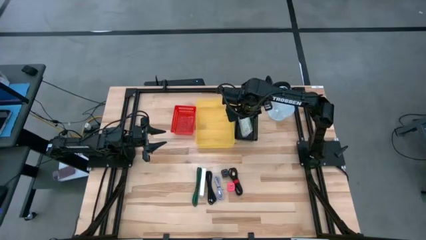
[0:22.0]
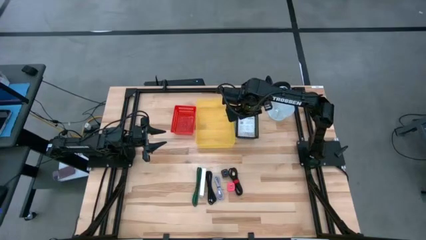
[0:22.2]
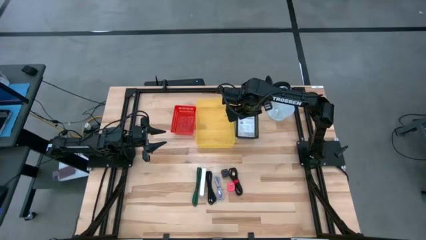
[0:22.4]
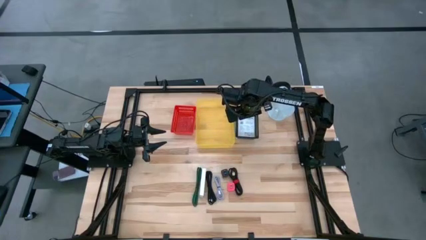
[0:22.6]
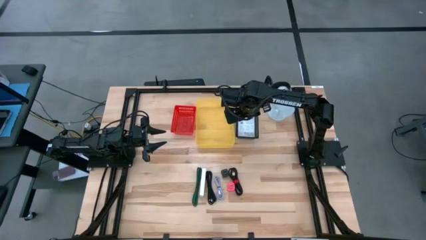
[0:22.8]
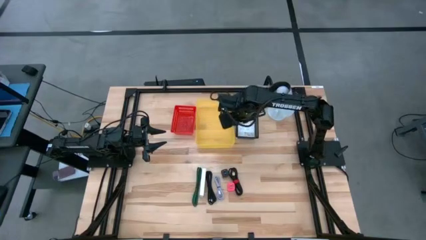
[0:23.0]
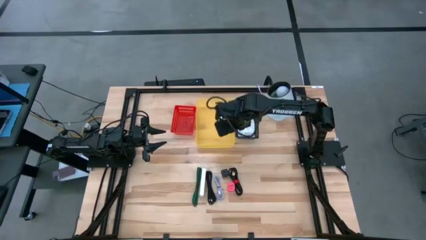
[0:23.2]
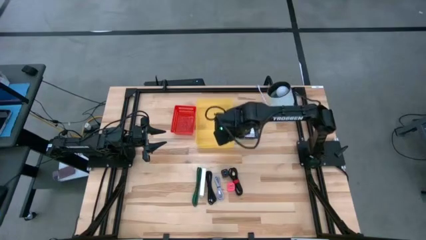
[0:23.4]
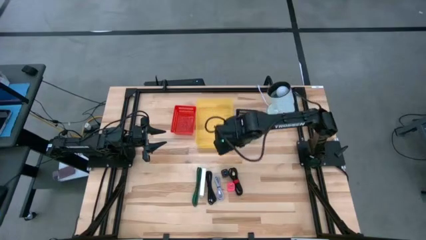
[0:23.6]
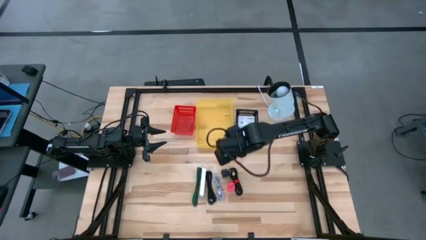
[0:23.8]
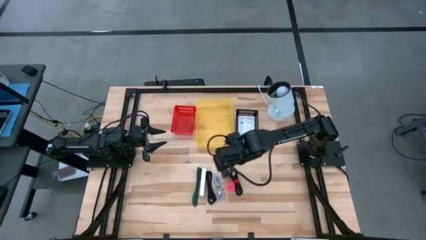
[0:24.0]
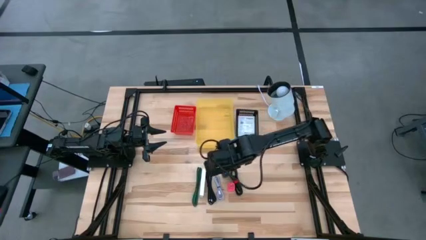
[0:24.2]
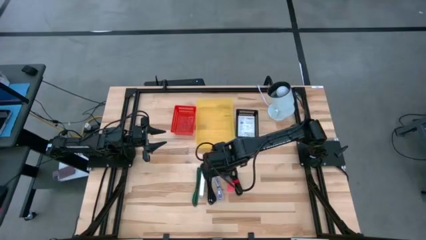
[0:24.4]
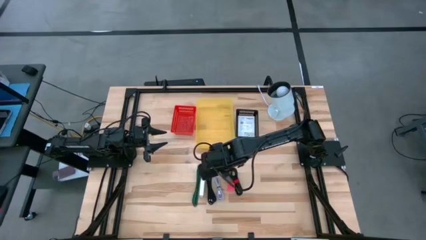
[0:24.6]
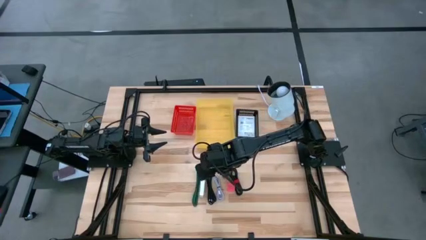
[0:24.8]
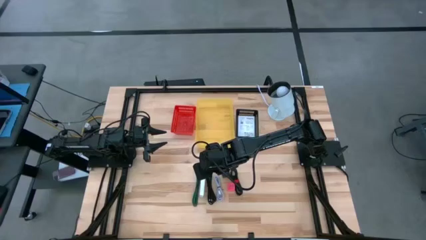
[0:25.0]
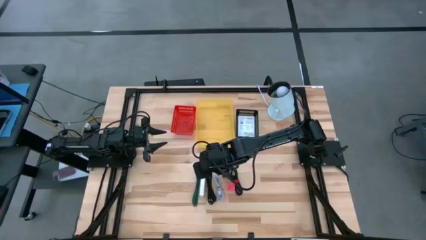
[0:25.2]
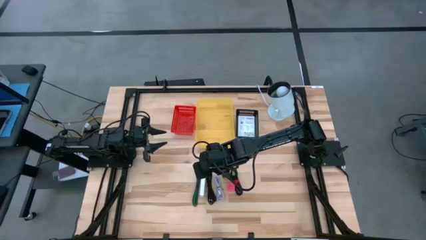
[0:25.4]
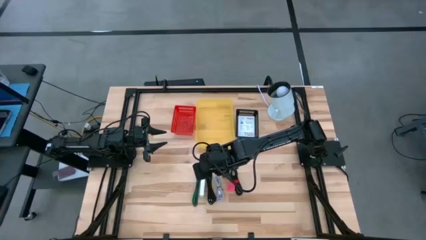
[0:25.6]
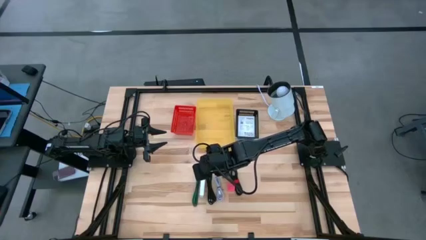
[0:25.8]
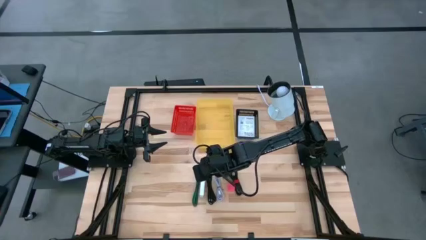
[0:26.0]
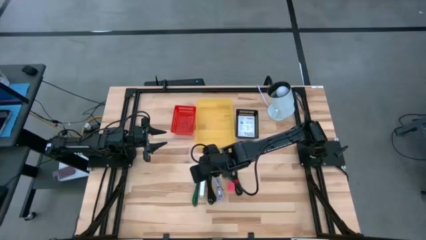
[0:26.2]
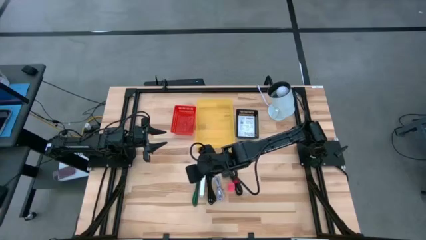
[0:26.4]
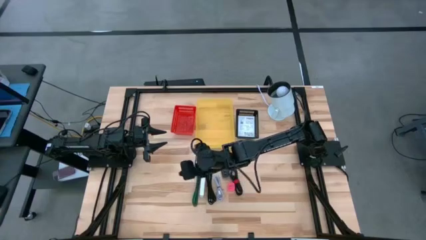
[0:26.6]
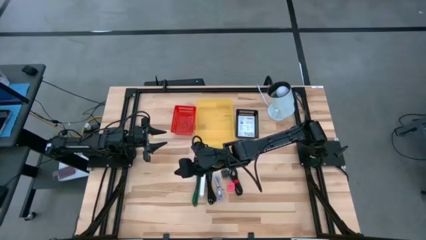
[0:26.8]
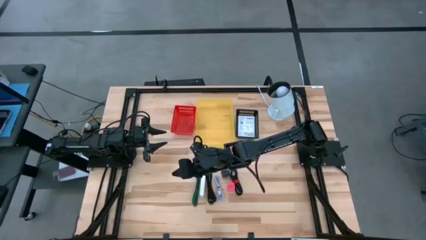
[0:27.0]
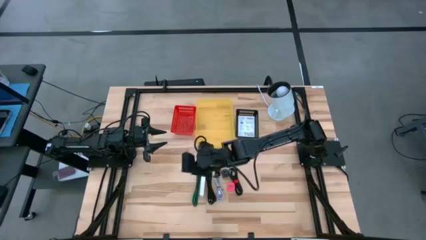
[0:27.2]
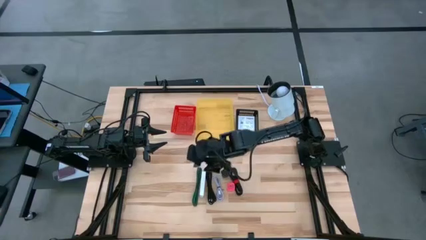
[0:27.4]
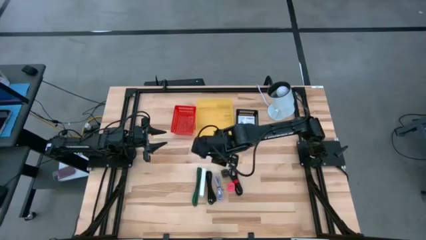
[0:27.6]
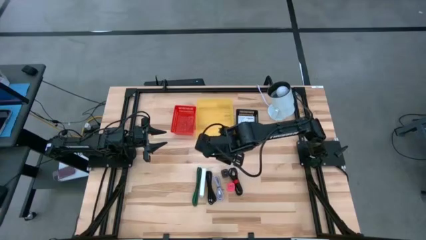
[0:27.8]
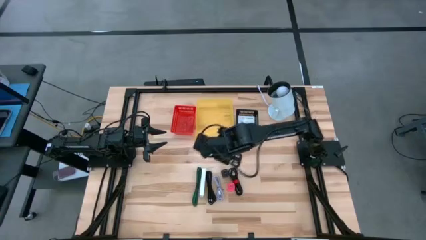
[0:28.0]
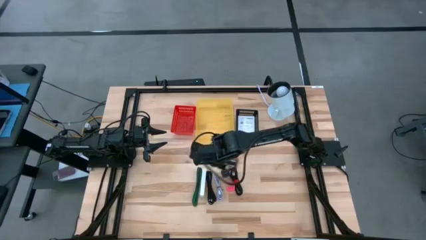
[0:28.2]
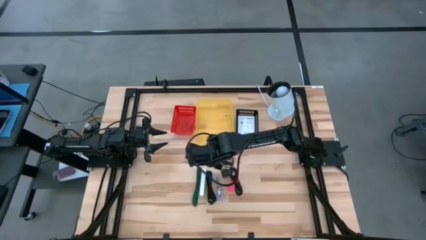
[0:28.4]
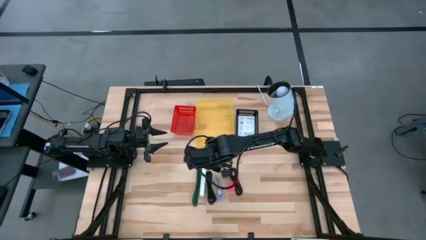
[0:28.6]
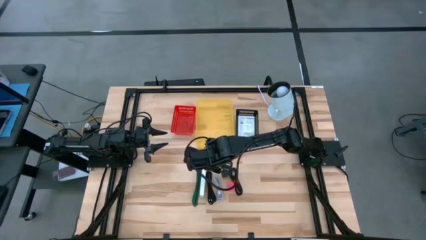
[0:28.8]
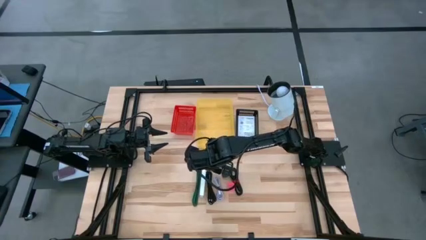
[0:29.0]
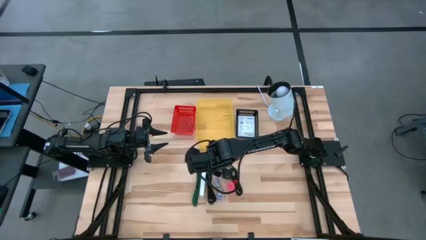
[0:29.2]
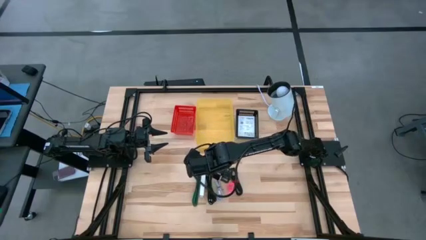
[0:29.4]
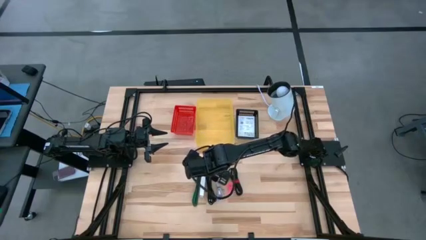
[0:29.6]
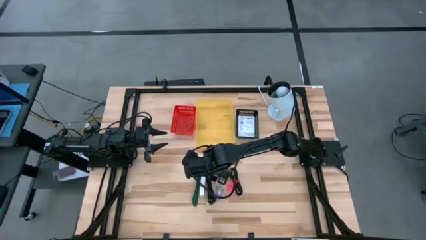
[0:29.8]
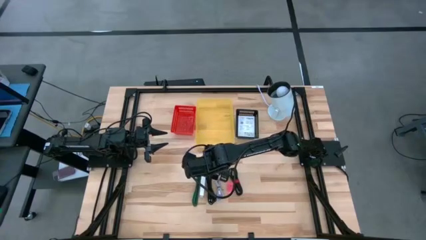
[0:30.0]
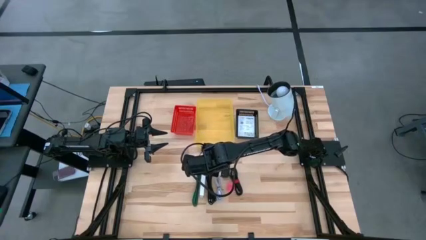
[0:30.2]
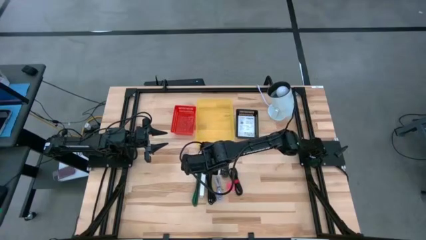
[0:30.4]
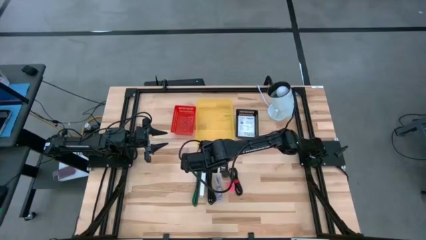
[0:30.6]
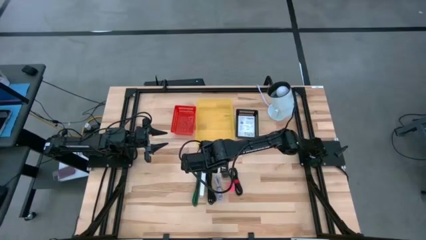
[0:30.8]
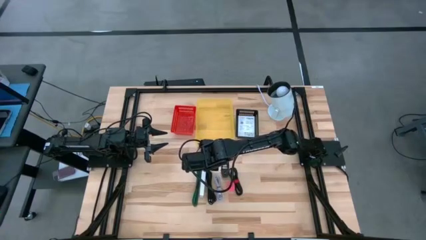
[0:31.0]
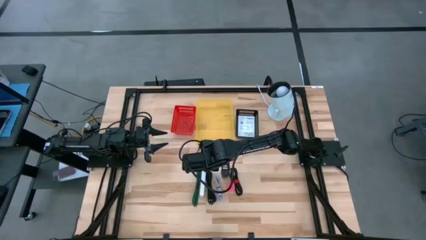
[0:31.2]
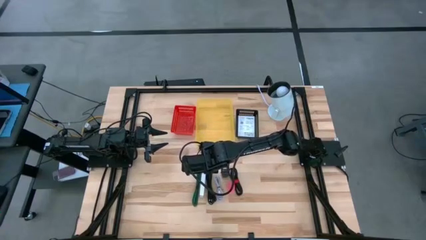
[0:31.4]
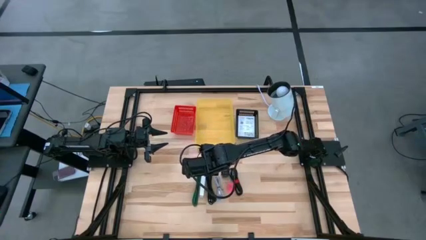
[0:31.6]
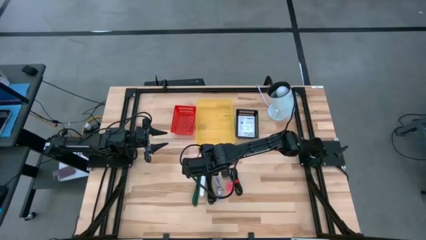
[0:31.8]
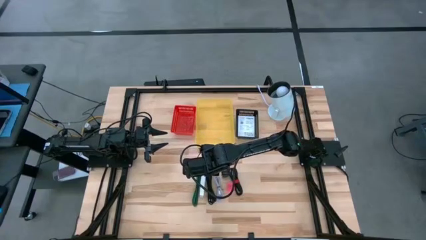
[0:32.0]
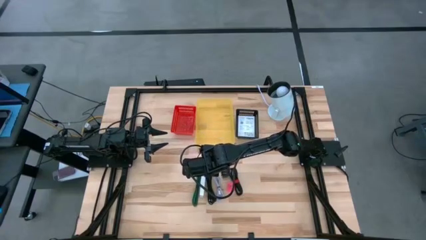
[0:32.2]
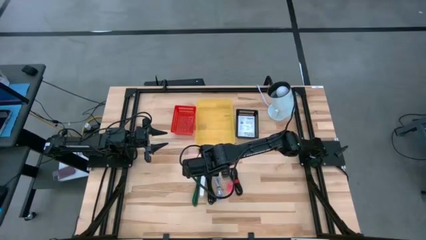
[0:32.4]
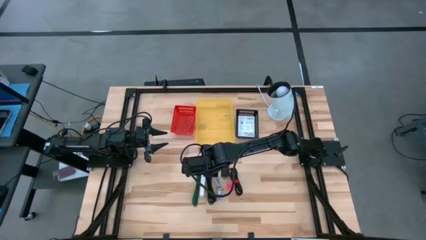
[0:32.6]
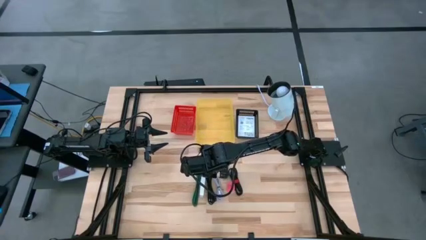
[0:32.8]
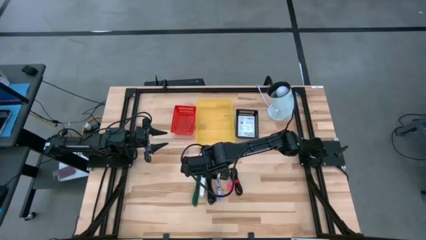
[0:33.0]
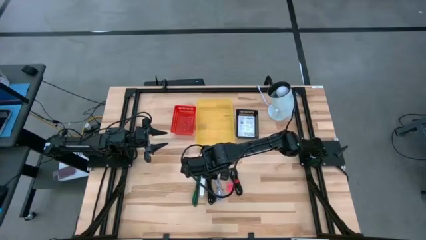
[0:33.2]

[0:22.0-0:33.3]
Task: Pick and place items into bin
Put the white card reader box into the black bin
